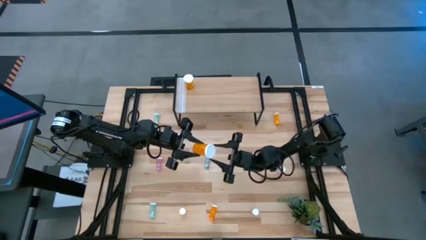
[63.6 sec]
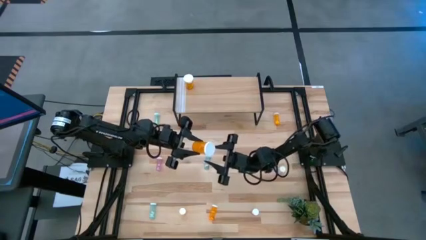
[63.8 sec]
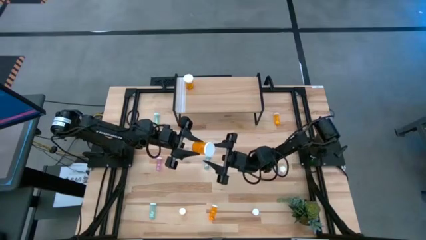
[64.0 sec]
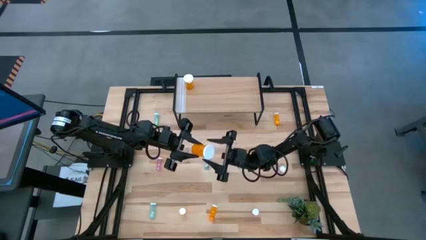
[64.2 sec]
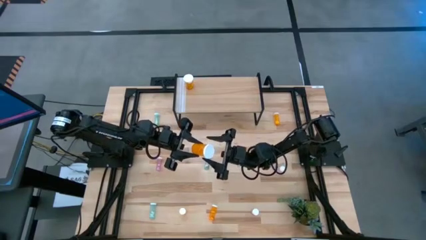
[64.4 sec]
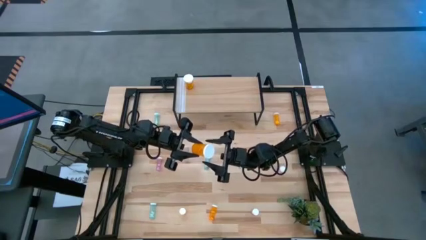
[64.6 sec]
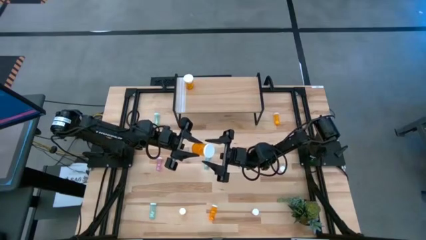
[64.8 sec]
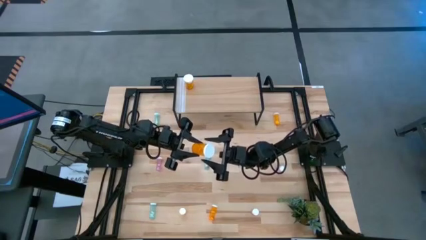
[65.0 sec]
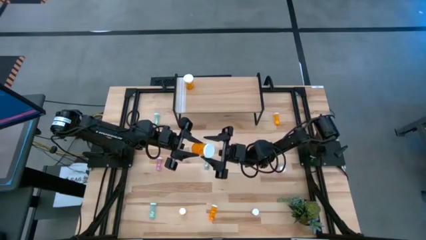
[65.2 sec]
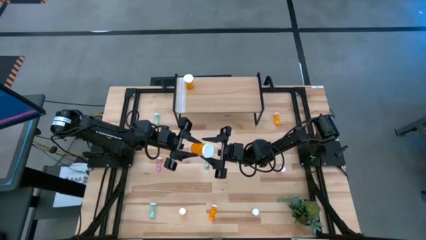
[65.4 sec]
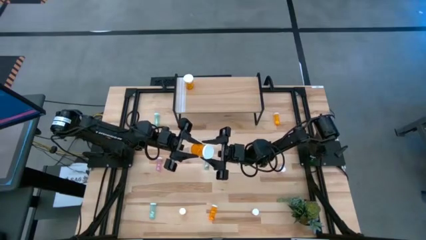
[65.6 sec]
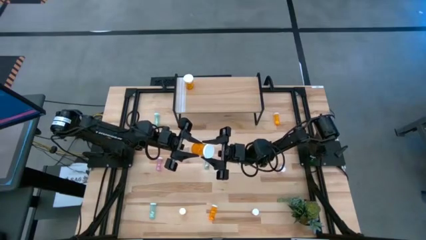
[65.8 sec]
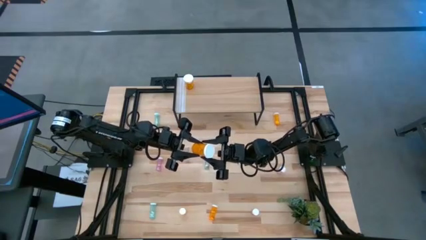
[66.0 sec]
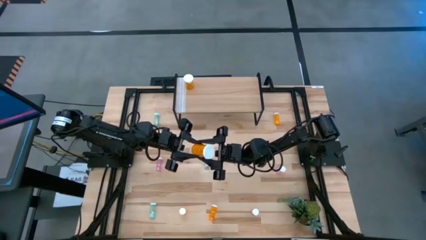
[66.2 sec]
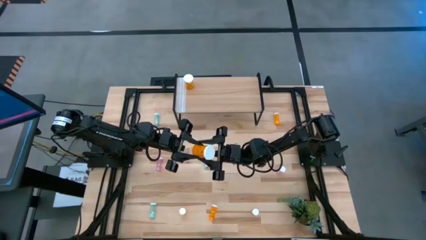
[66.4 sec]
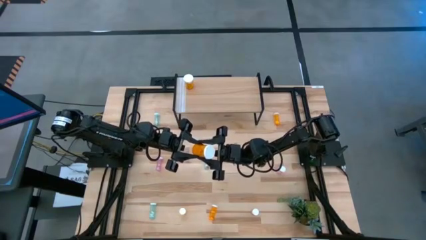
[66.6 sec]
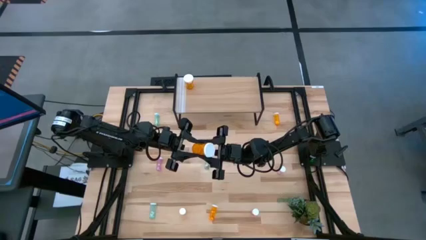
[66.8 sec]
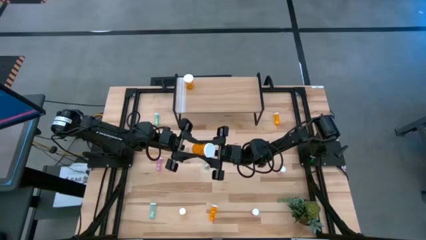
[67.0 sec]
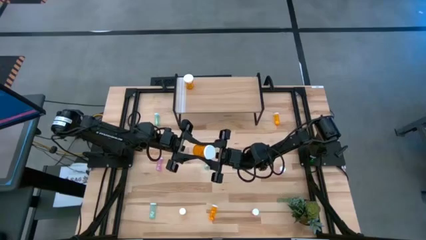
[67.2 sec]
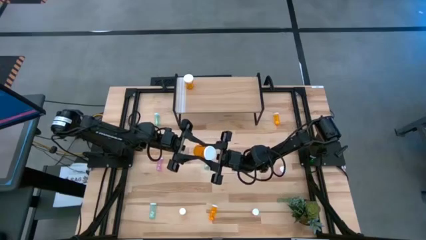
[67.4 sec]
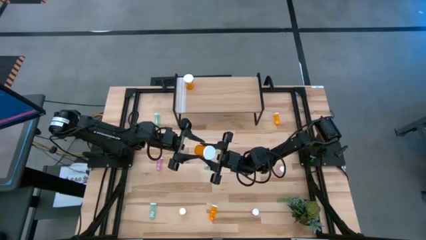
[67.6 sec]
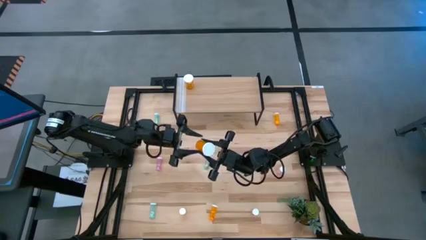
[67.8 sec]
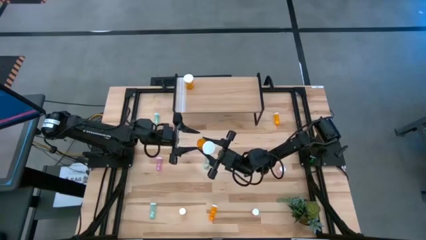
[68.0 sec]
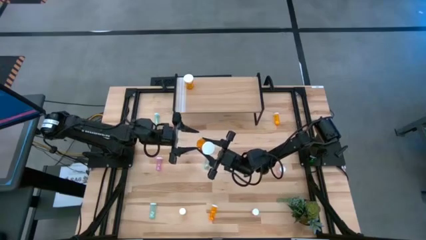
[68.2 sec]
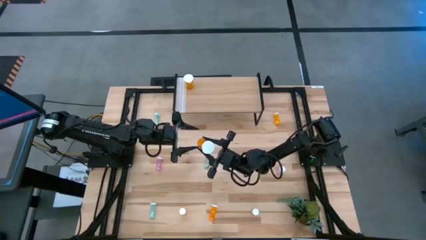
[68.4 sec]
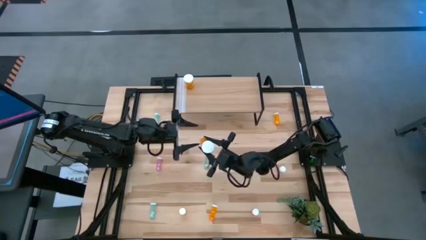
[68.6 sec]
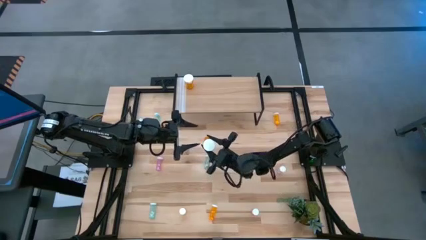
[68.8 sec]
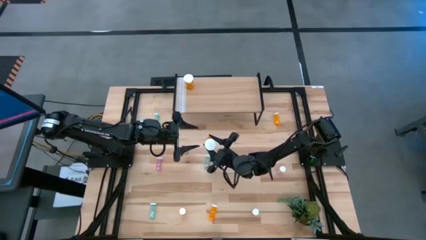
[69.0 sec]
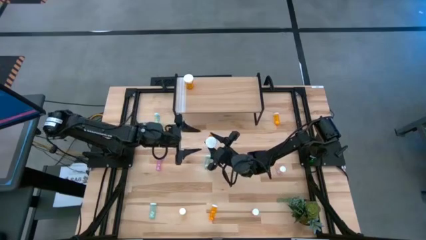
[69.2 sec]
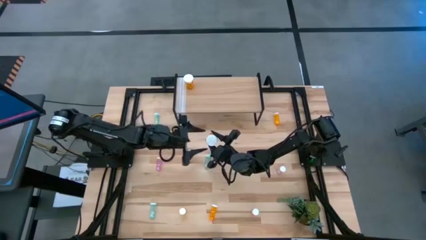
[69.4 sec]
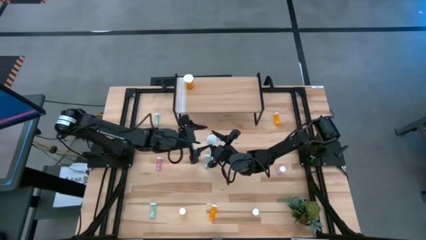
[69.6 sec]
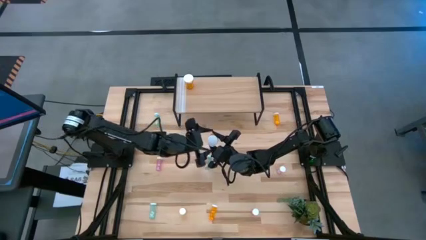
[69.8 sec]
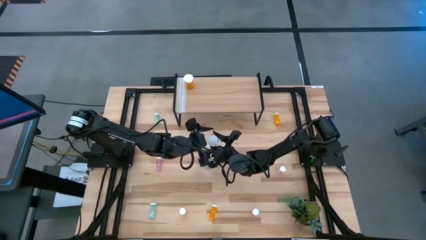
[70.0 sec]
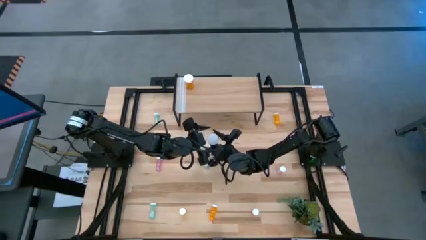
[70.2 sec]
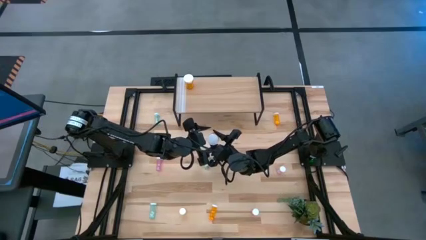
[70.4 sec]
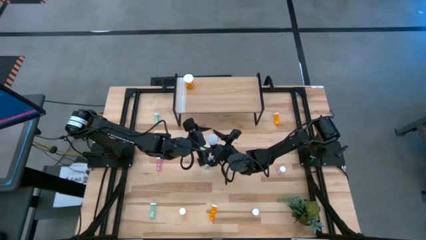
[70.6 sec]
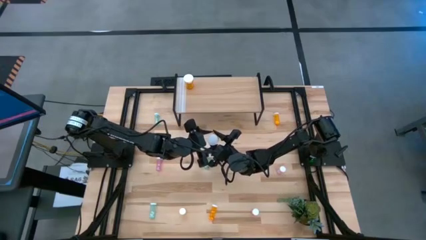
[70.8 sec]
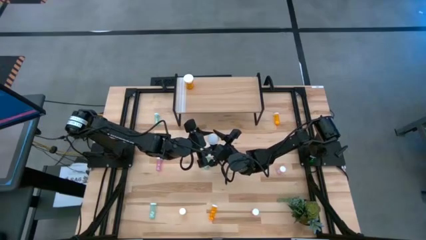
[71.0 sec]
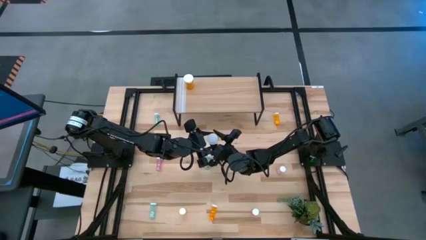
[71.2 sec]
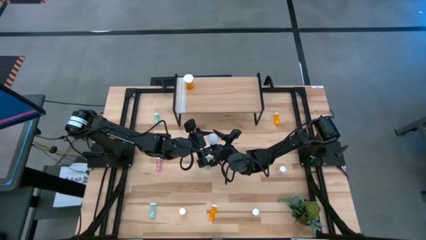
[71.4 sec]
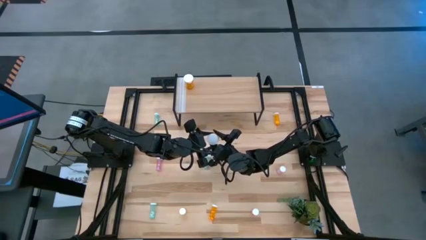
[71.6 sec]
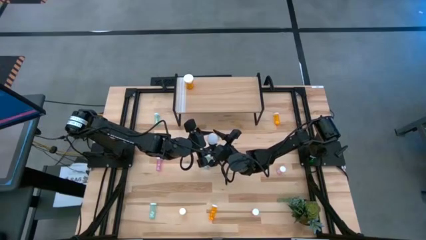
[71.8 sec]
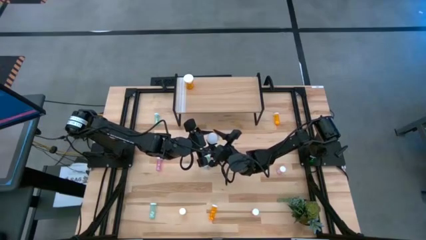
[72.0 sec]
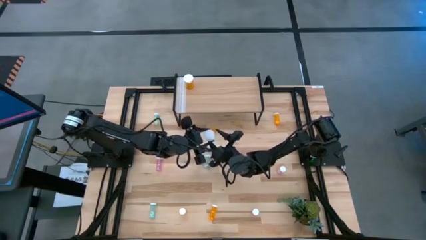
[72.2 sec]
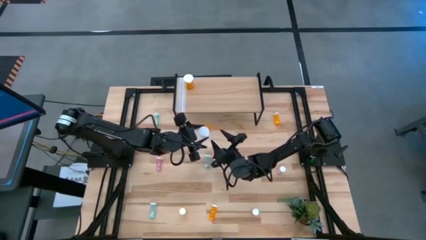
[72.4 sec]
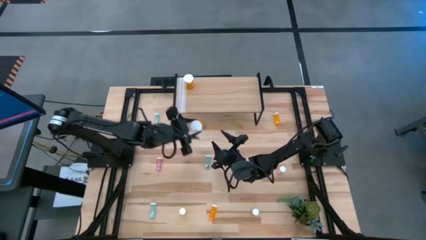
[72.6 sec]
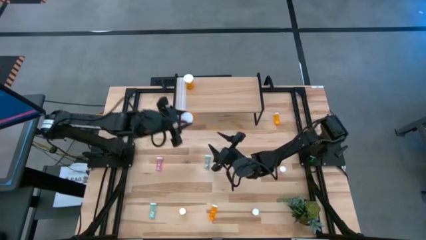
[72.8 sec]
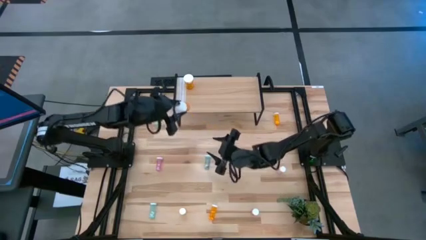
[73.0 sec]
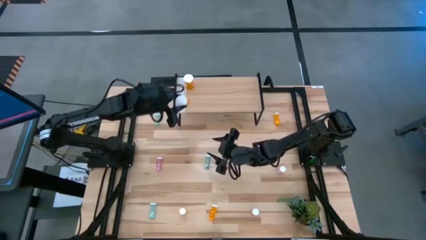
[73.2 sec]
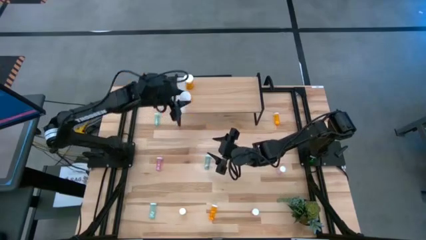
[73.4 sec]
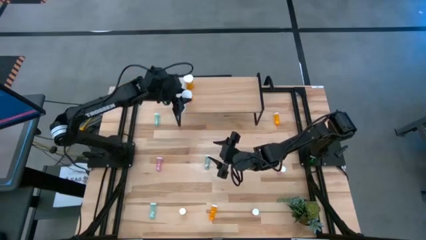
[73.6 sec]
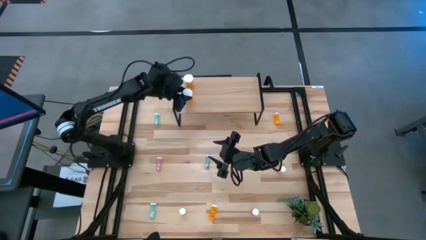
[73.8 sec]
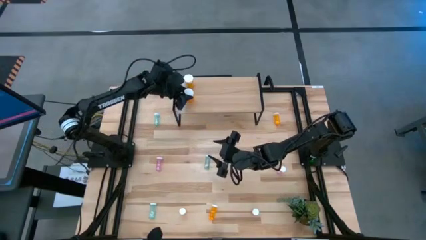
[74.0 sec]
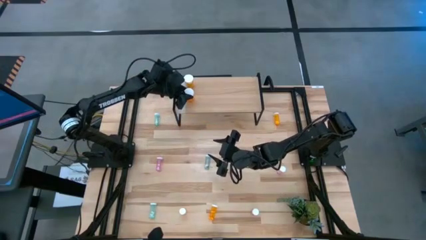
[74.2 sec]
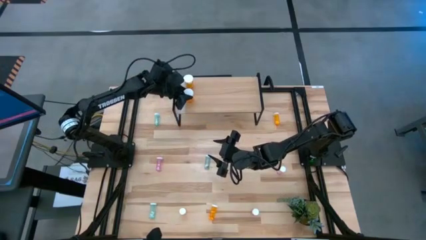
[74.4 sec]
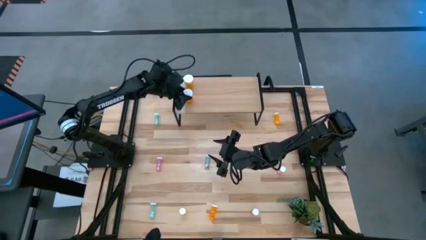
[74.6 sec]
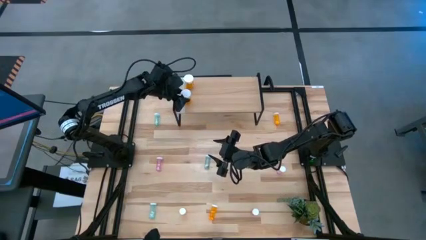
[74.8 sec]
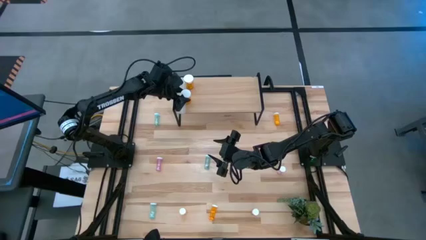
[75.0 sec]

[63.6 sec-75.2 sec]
Task: Pick and place medicine bottles onto shelf by color
Put the large orange pill bottle aligned with the other large orange pill bottle on the shelf

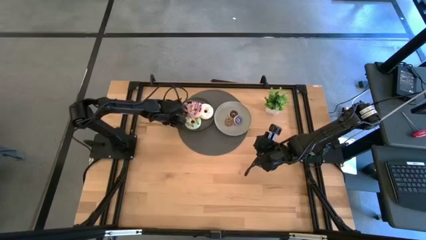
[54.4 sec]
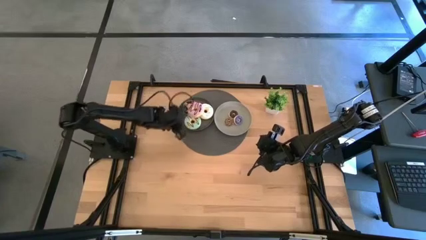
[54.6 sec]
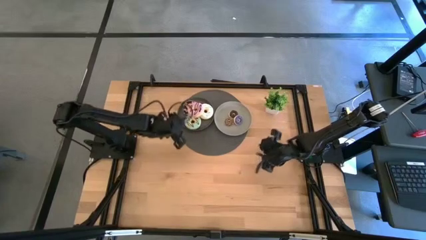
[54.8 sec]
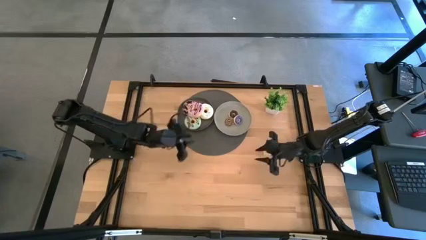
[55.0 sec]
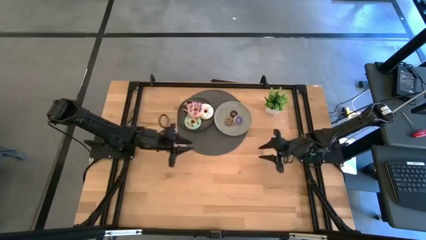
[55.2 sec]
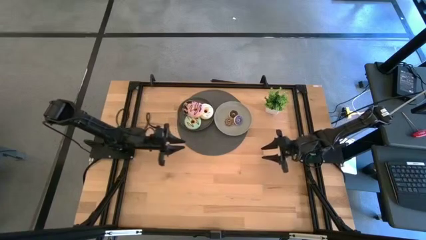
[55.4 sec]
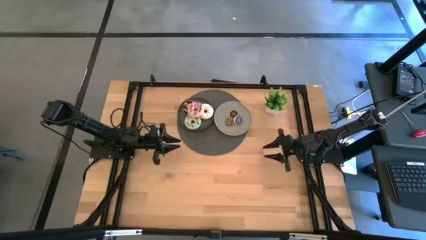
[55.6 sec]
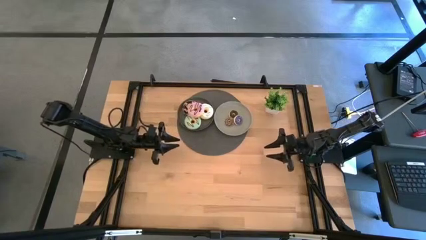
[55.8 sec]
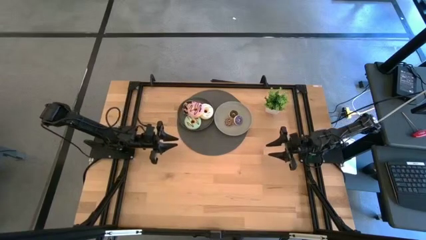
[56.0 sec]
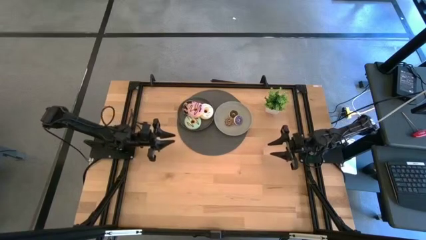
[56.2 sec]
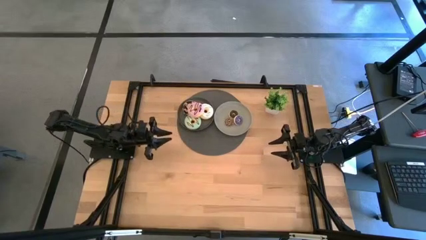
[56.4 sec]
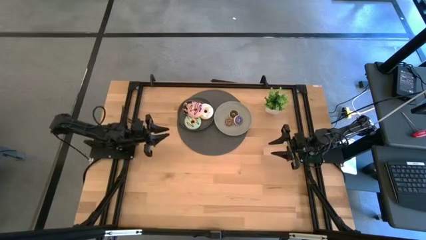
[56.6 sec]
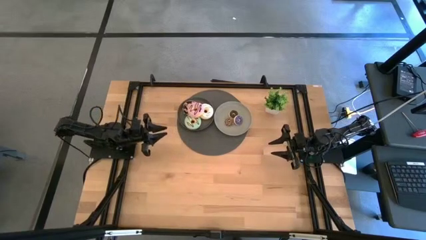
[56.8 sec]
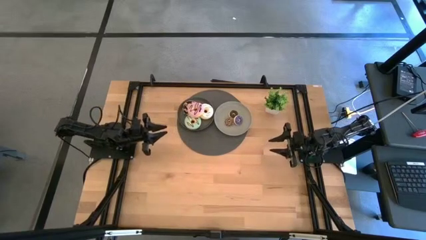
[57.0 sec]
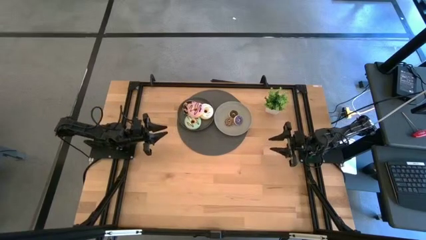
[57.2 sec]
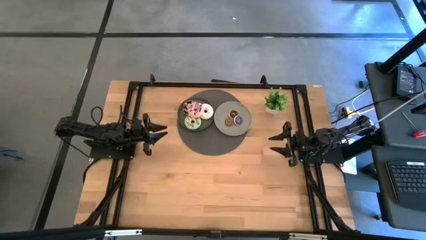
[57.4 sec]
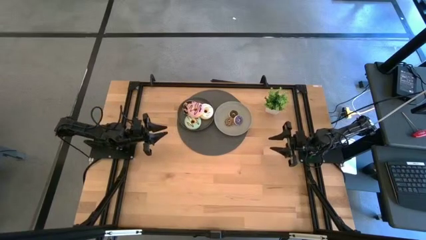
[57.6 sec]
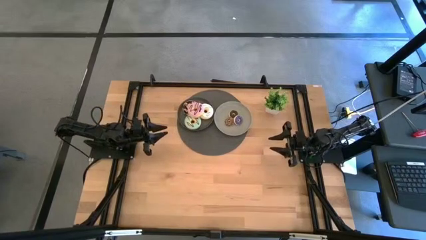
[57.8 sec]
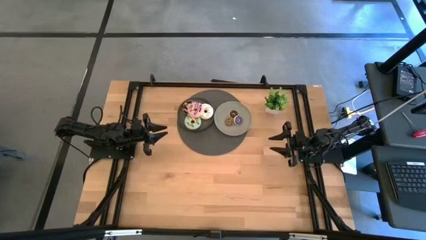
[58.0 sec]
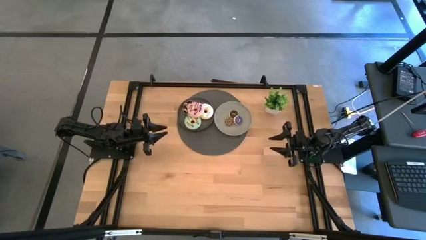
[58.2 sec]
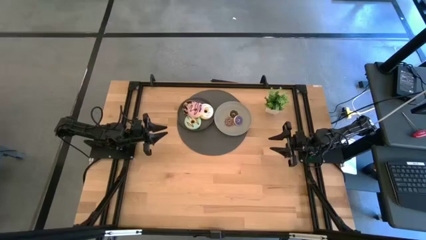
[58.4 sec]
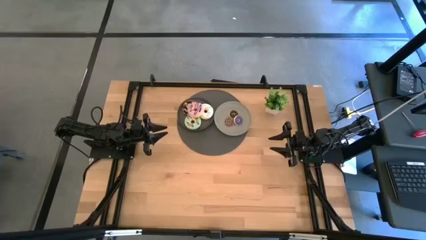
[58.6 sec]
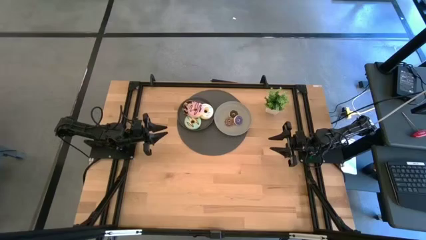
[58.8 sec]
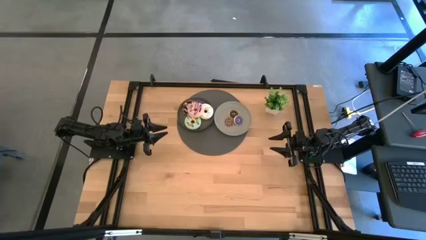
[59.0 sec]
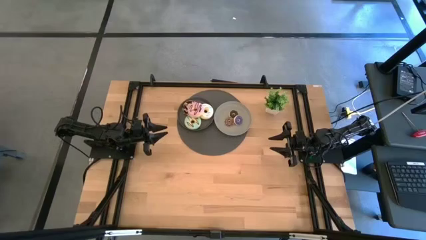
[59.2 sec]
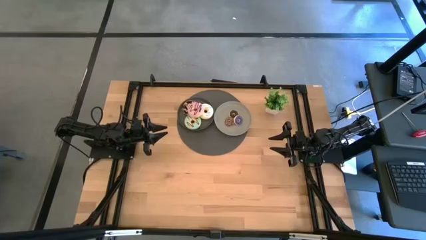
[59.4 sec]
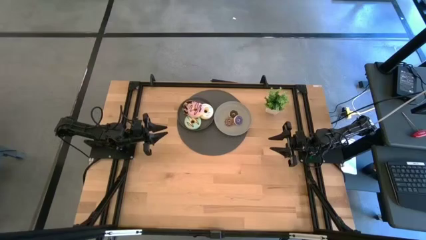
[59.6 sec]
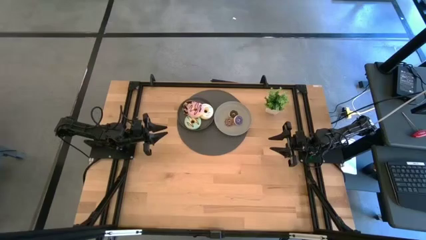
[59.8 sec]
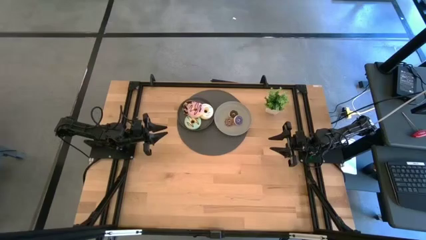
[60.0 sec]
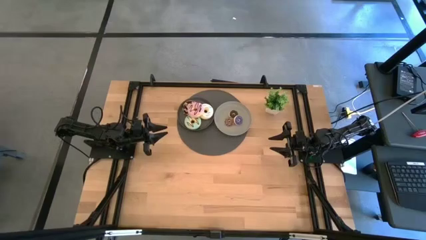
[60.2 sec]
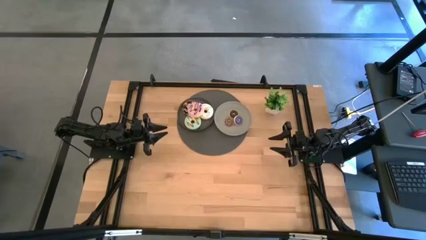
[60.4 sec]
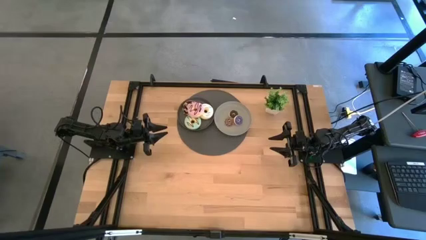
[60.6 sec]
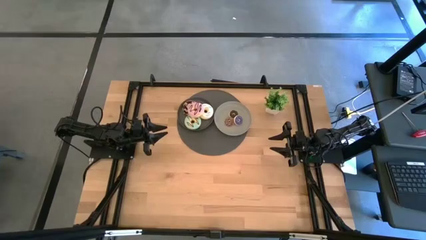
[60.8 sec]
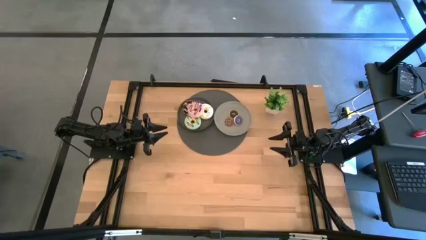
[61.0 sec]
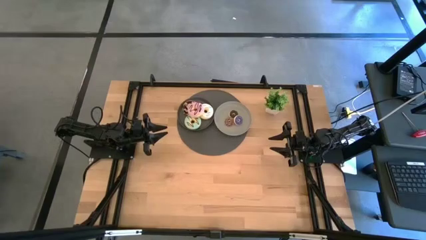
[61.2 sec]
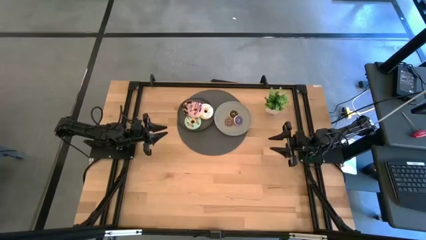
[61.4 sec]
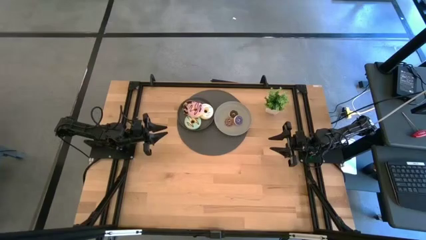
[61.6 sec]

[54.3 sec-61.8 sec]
Task: Pick & Place donuts
Return to Home Position
